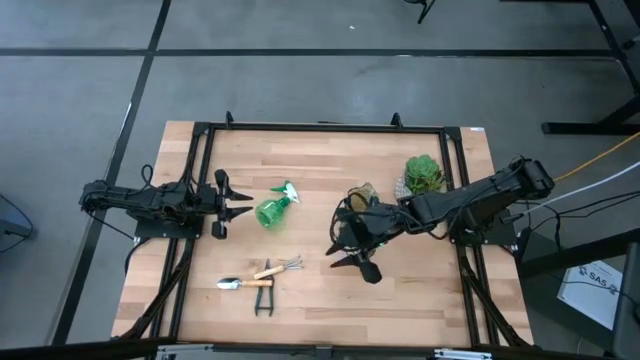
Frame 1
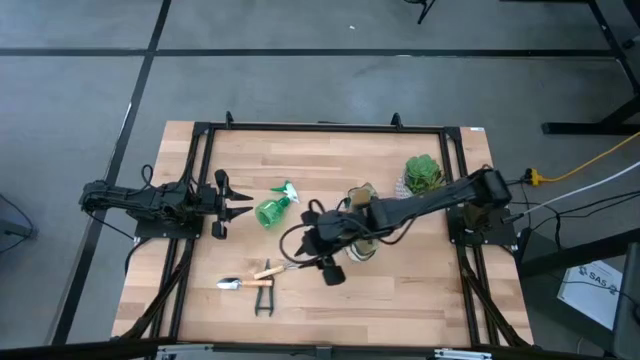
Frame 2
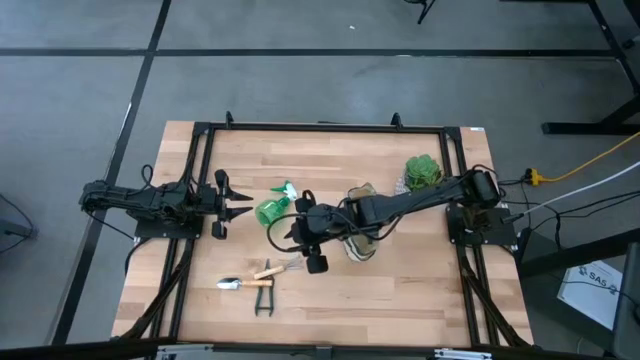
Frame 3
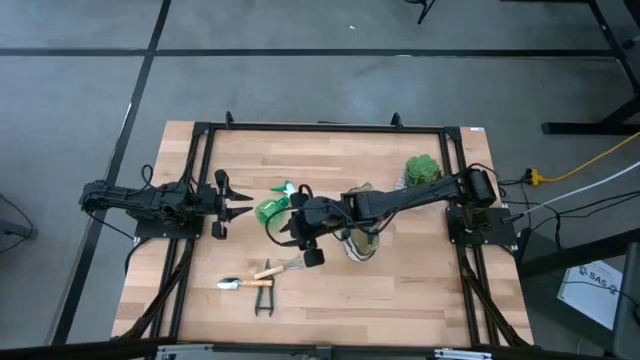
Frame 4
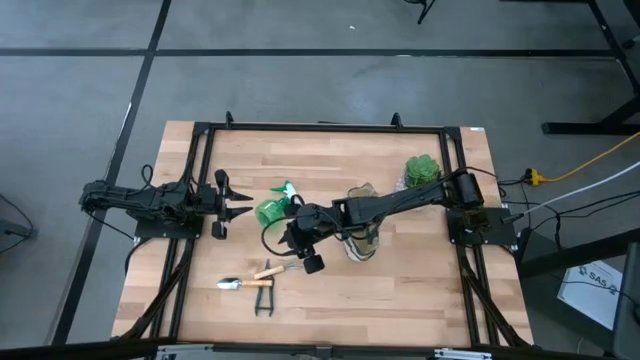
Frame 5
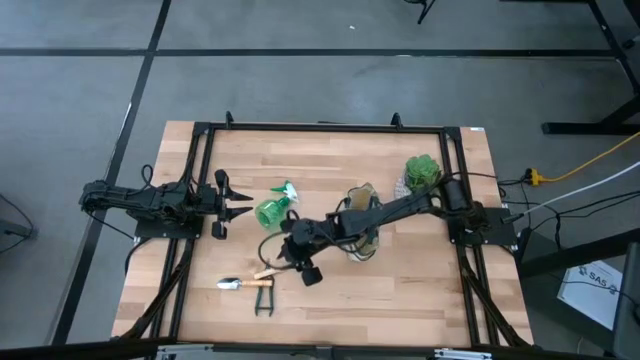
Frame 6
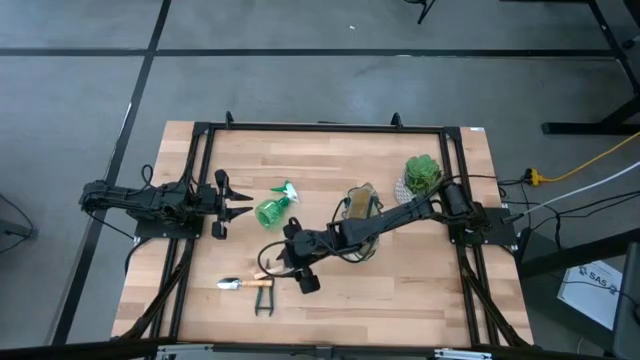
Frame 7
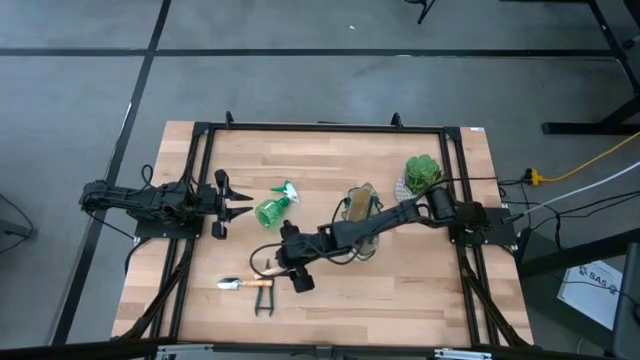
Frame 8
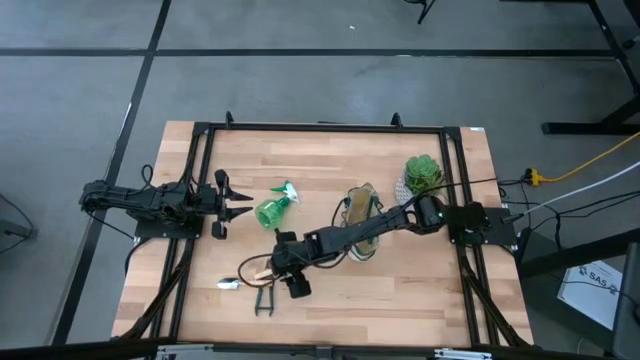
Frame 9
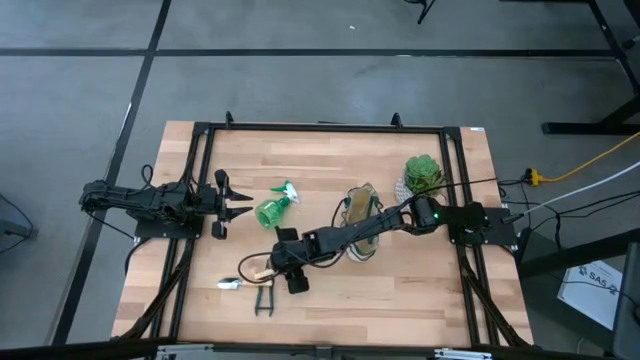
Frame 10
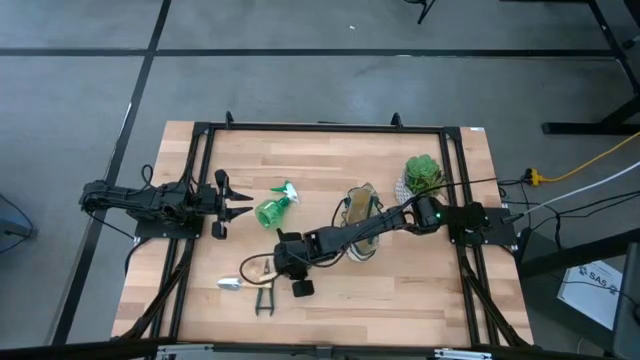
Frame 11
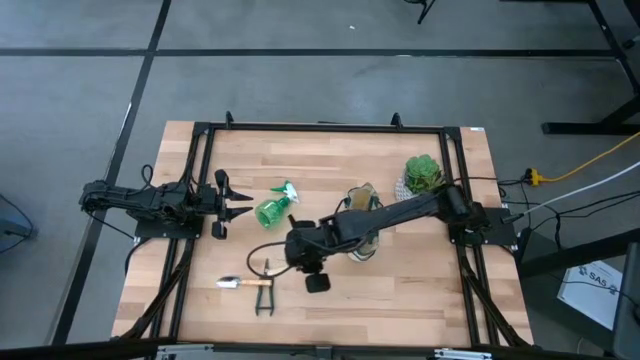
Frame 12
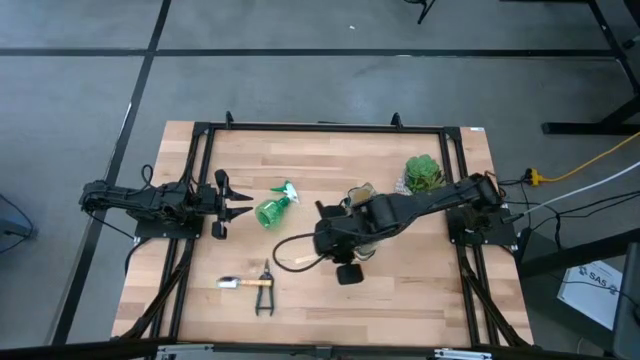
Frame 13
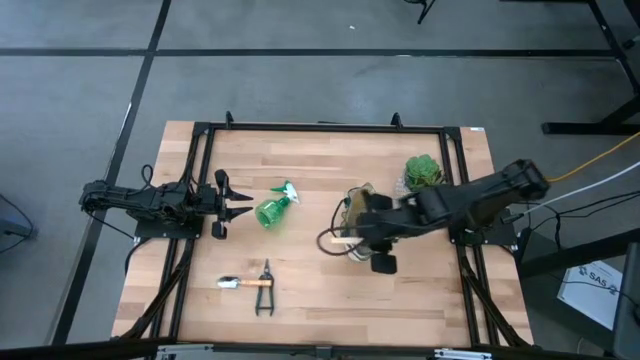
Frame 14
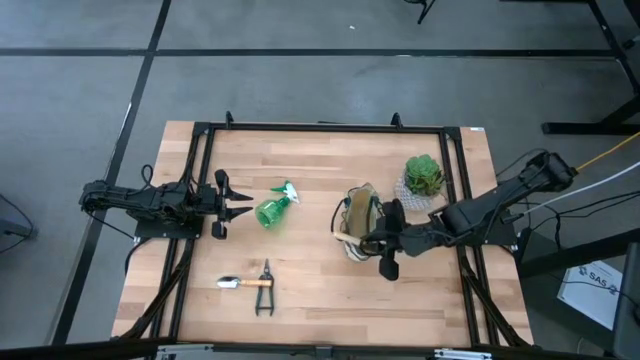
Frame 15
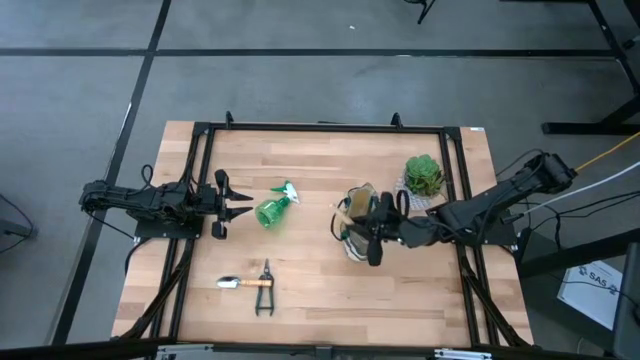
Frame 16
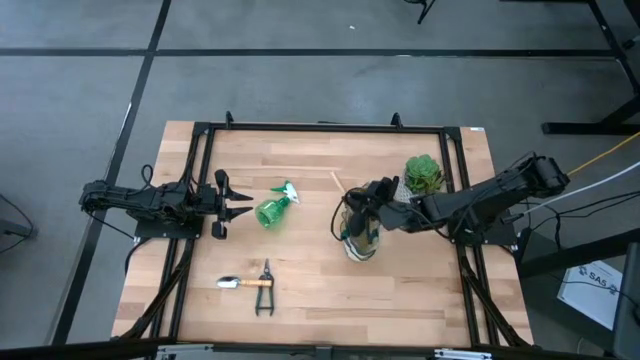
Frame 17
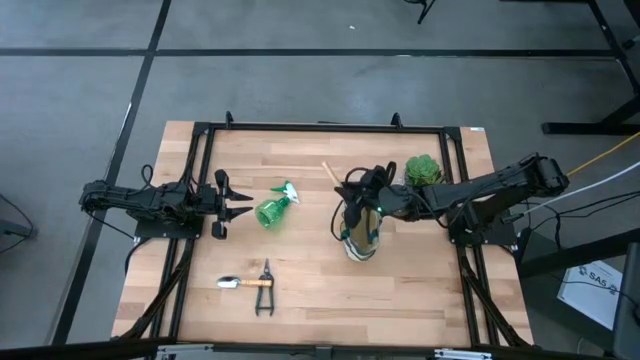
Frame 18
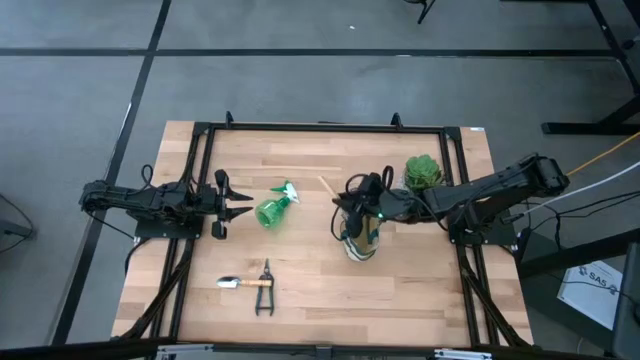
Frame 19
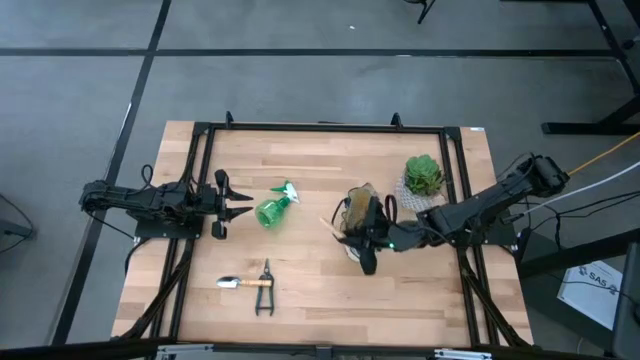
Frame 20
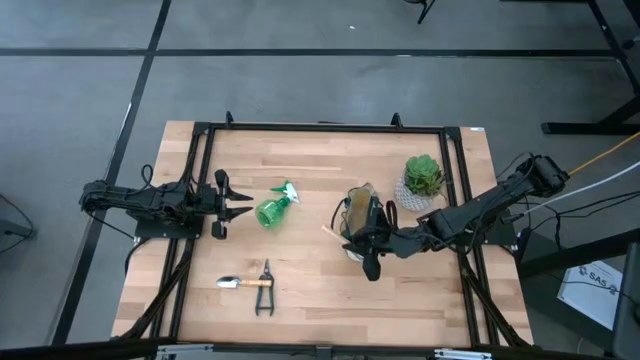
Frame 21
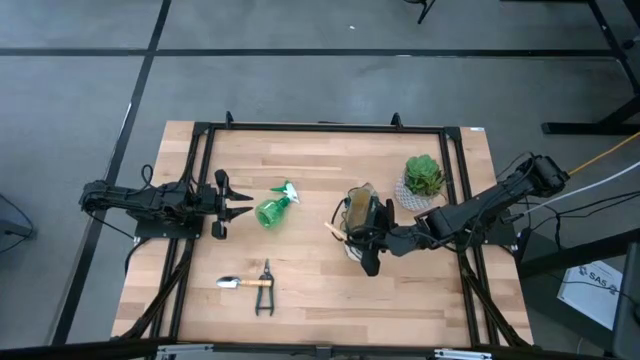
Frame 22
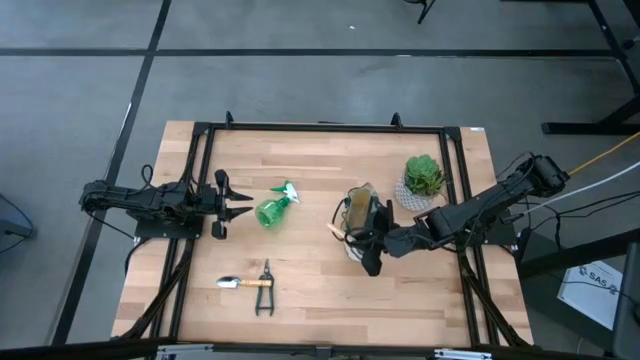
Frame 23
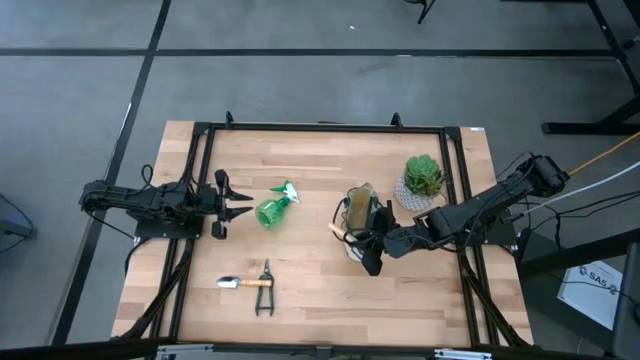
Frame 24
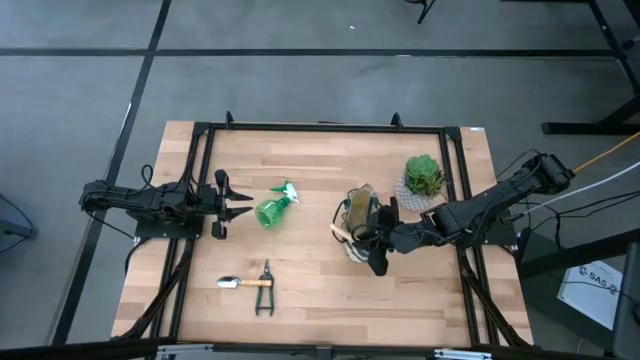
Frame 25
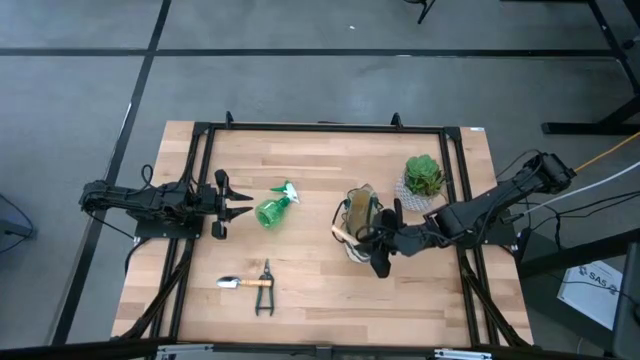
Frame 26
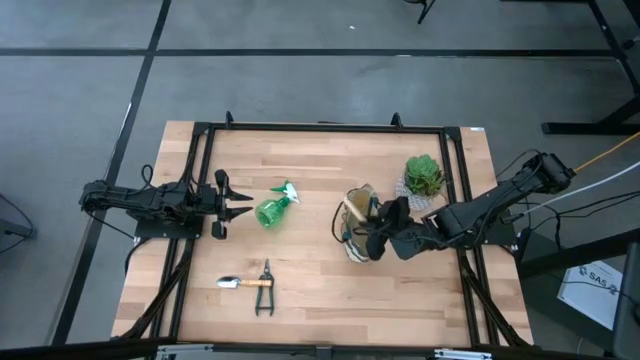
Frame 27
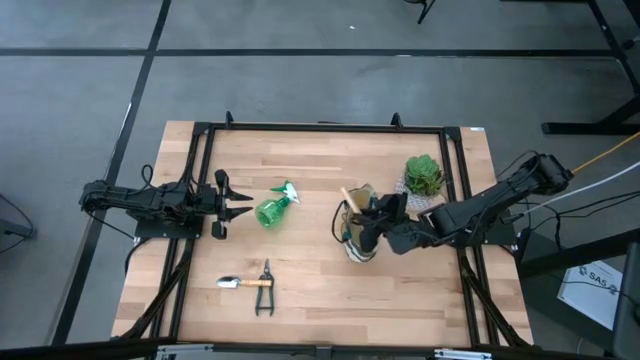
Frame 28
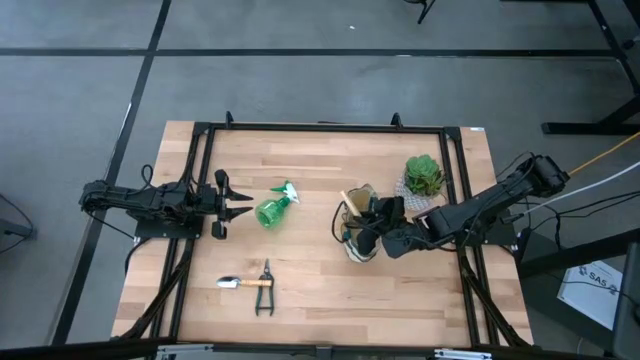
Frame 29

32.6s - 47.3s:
Task: Pick & Place Garden tools in Gardening bag
Put the light brown rake into the white gardening bag

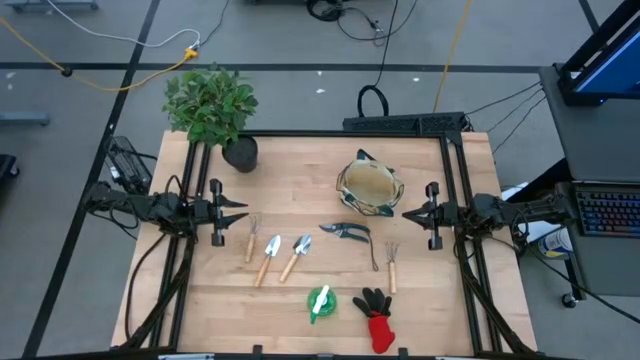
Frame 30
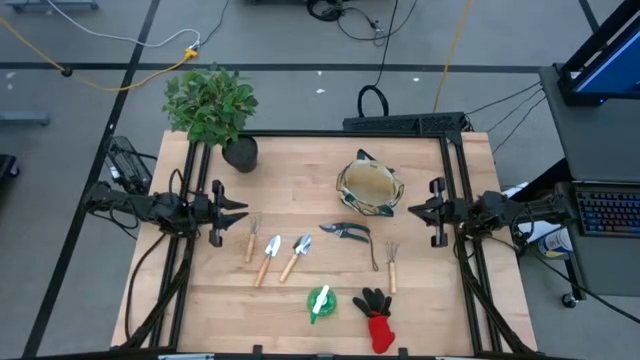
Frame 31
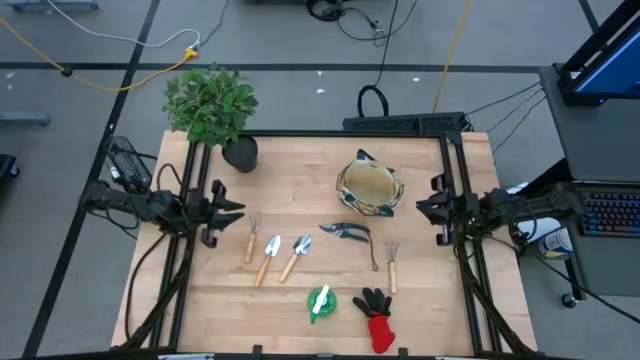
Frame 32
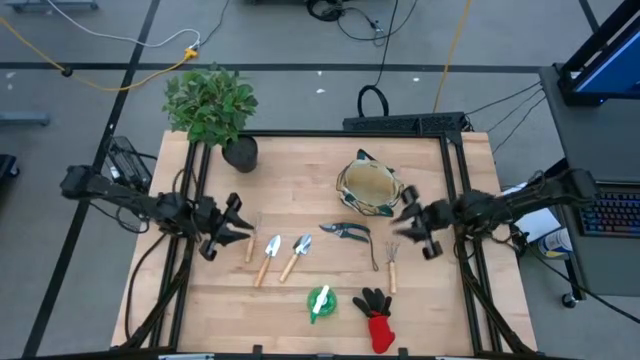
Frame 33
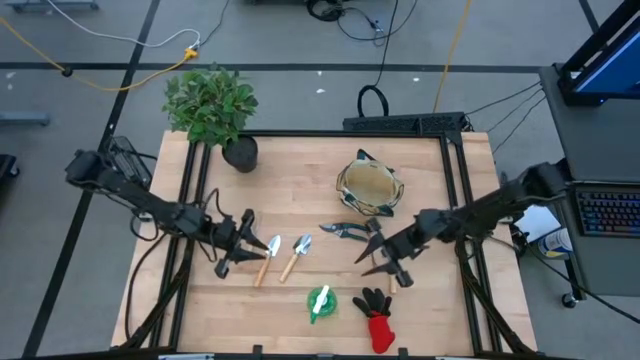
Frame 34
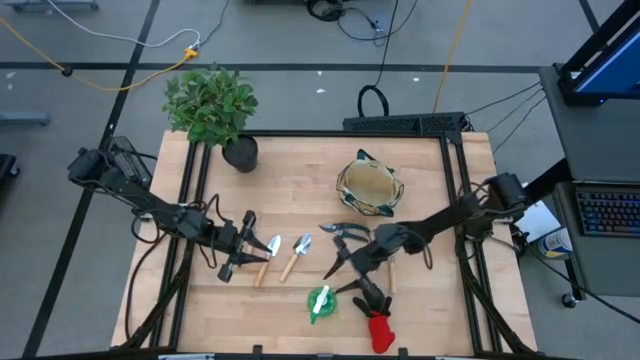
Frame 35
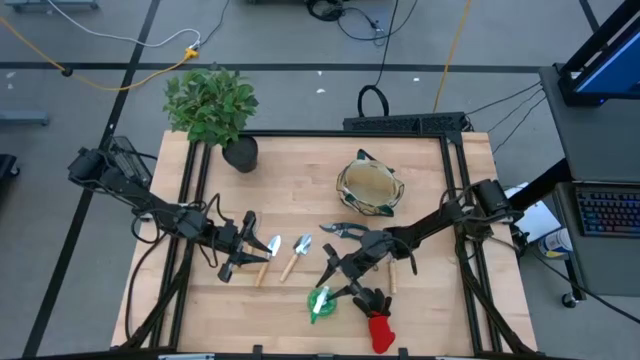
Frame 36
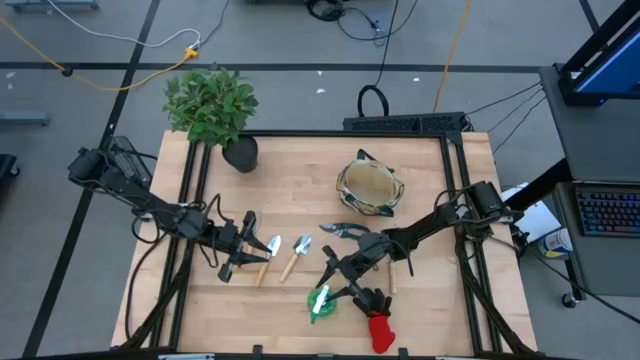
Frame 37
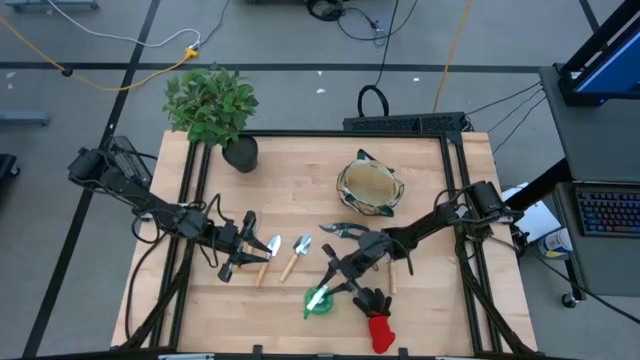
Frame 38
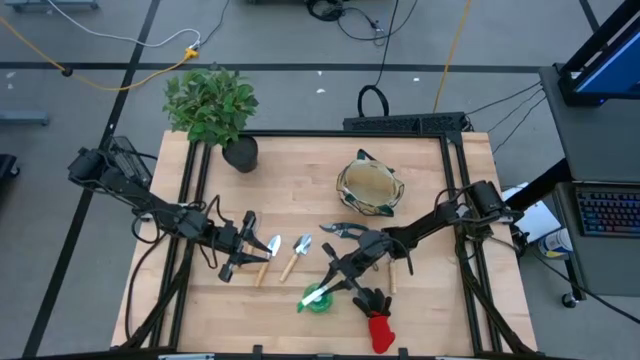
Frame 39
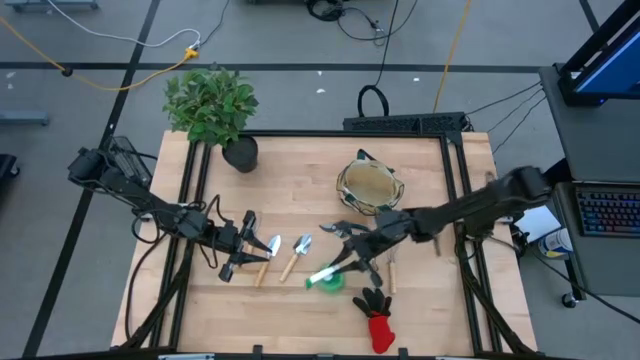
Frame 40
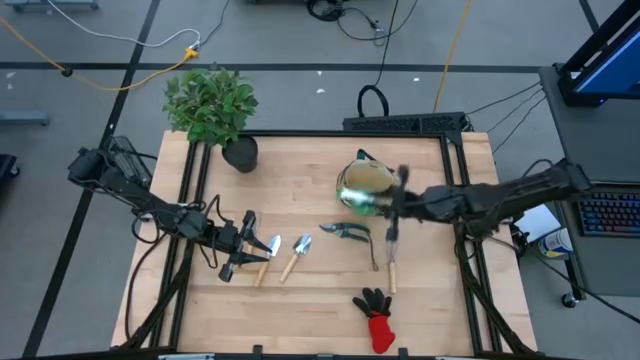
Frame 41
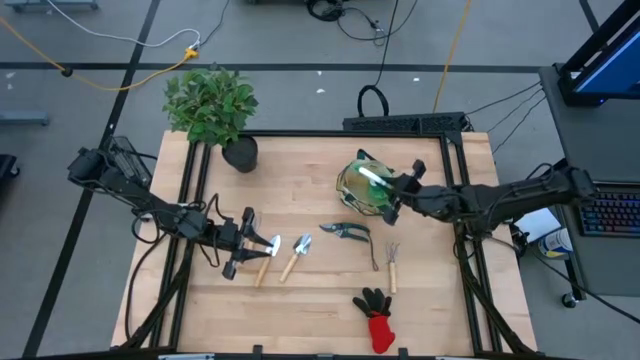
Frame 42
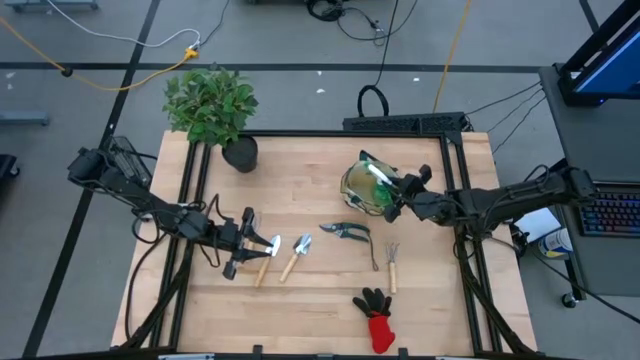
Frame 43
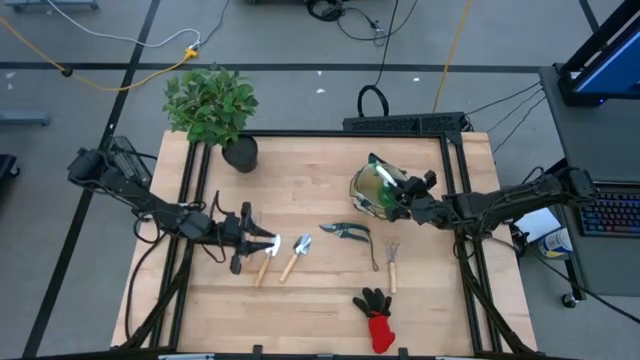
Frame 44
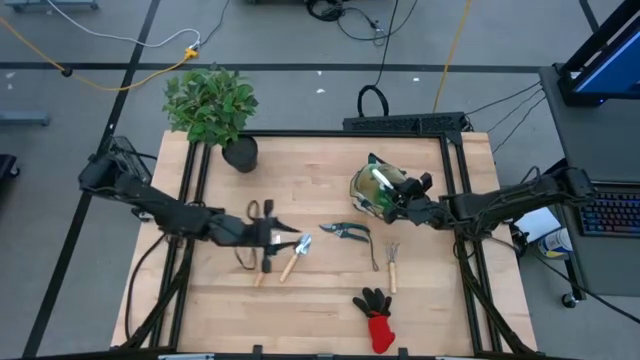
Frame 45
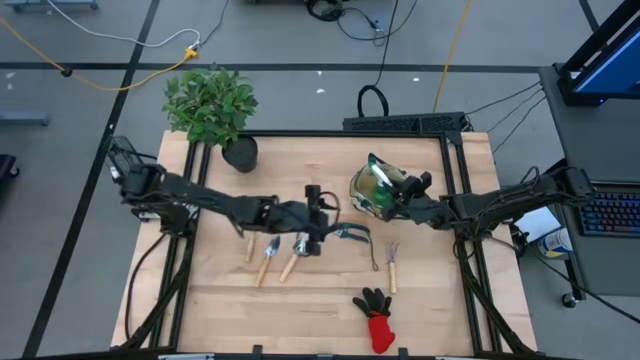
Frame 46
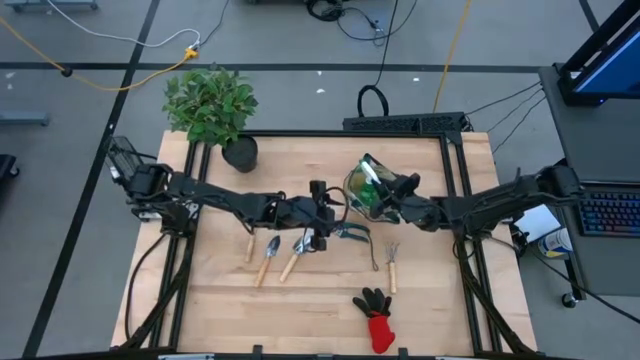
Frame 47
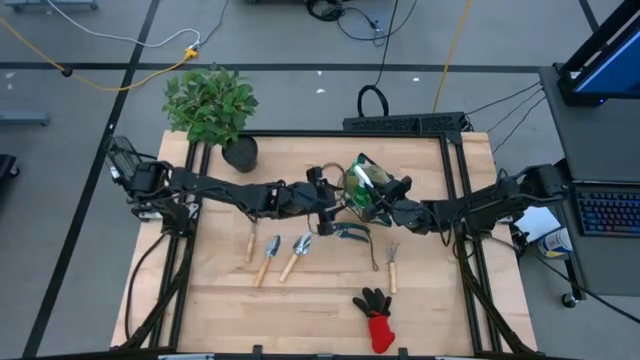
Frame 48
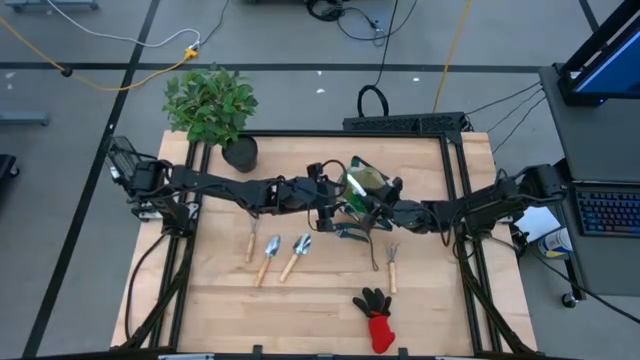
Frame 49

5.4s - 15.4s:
Task: Pick & Place Garden tools in Gardening bag
Put the spray bottle into the gardening bag
